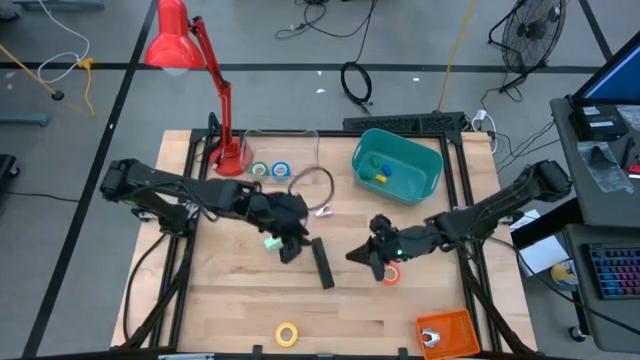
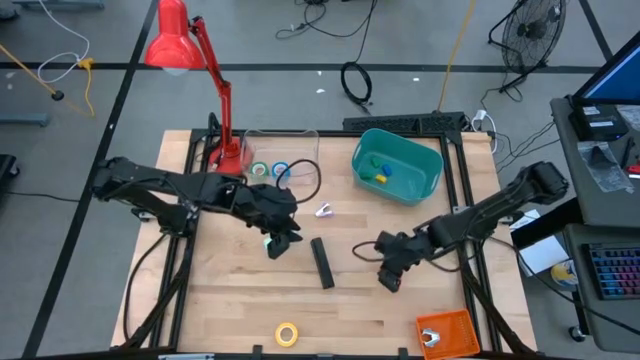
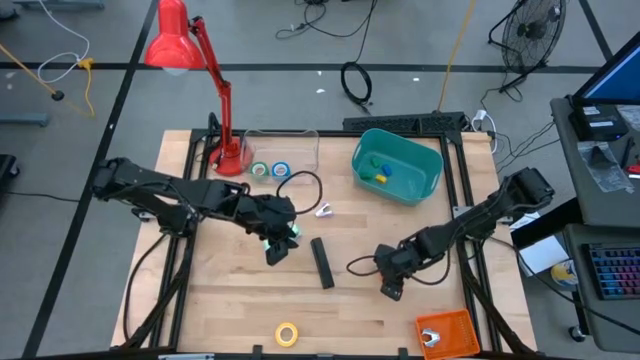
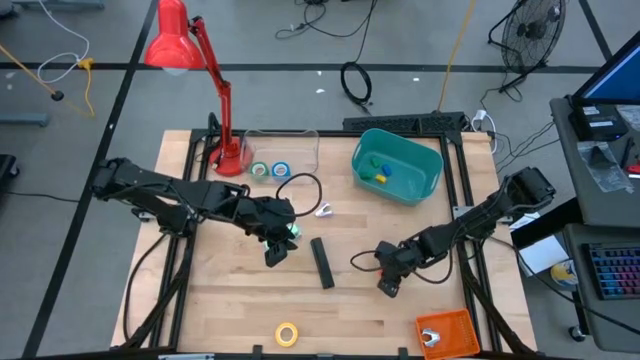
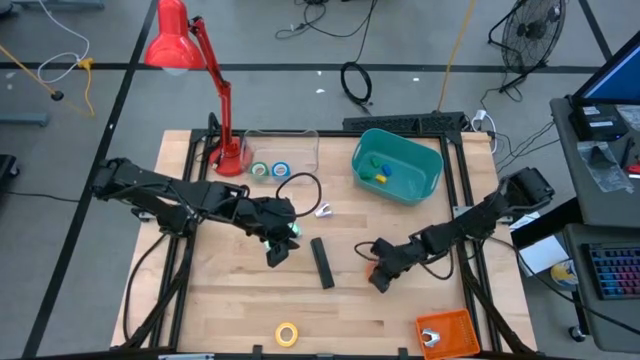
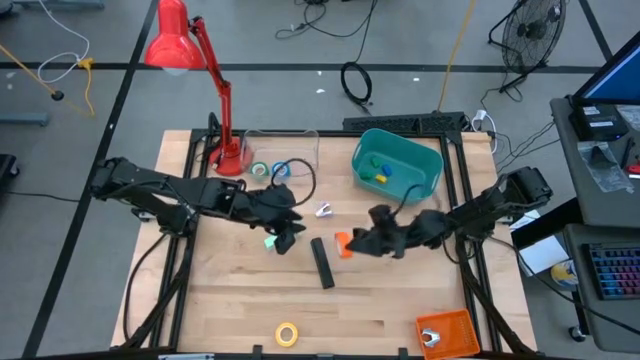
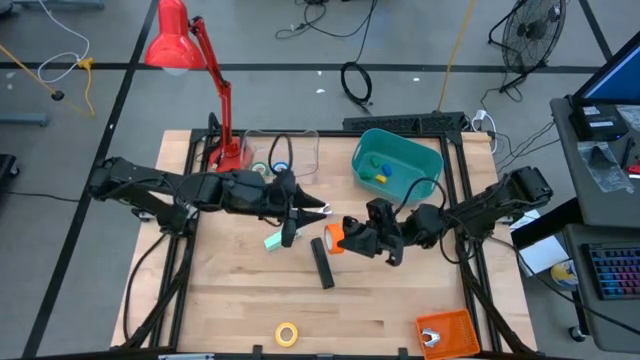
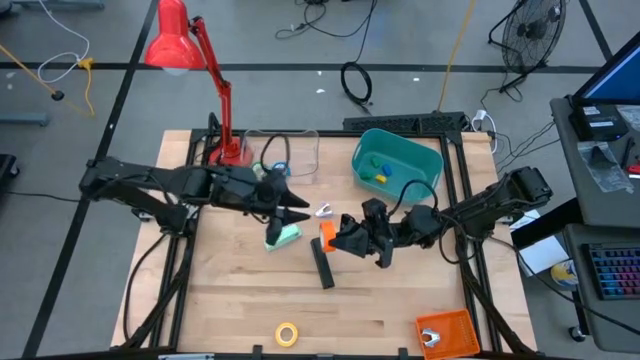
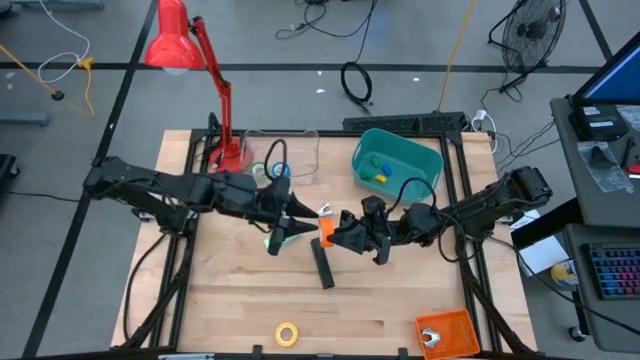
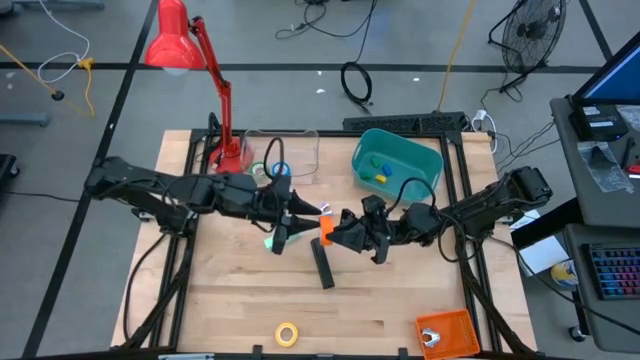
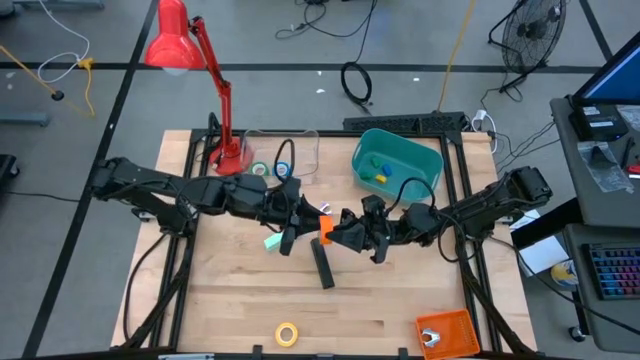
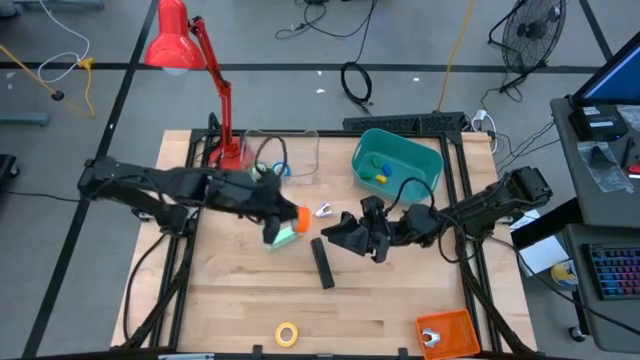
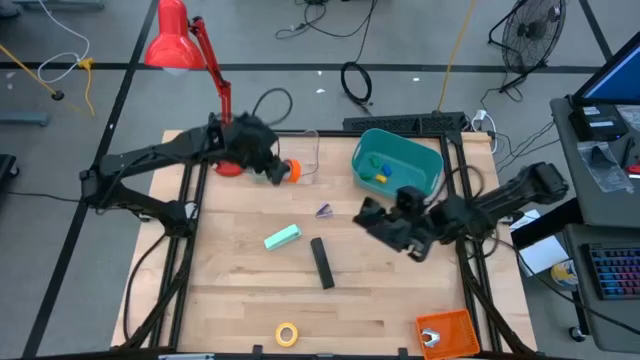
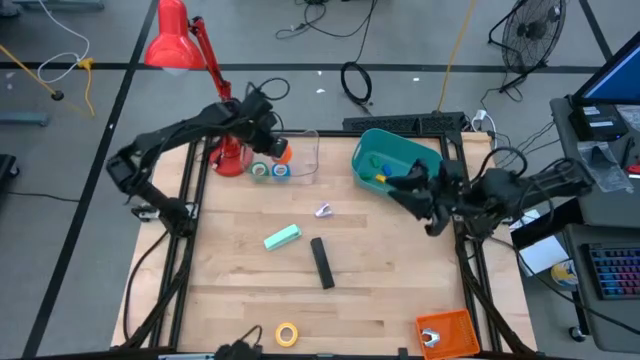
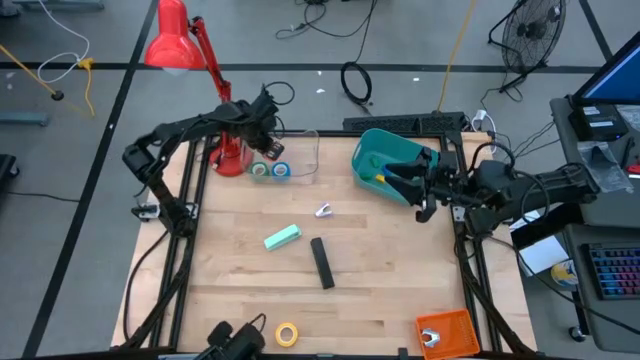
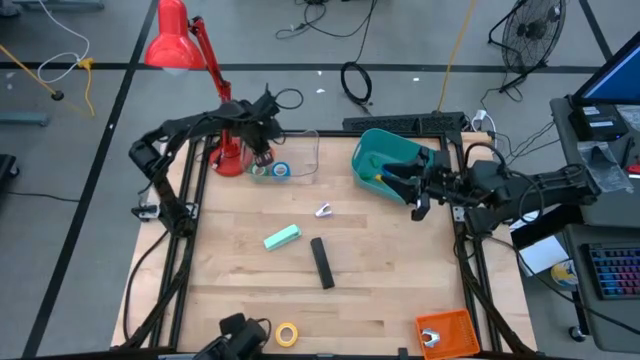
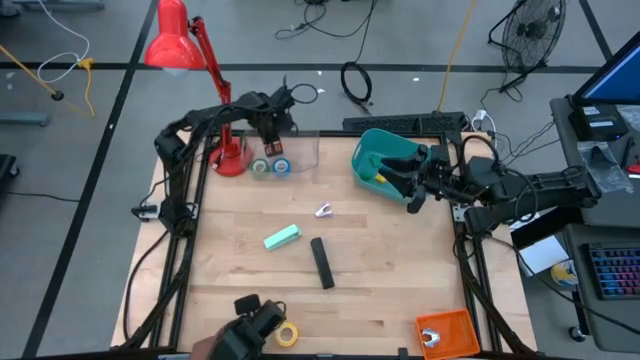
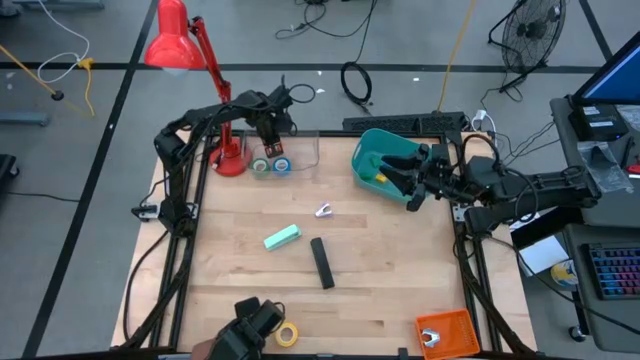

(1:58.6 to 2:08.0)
Task: Pick and place Stapler, Stapler remover, tape
Put the orange tape into the transparent bin

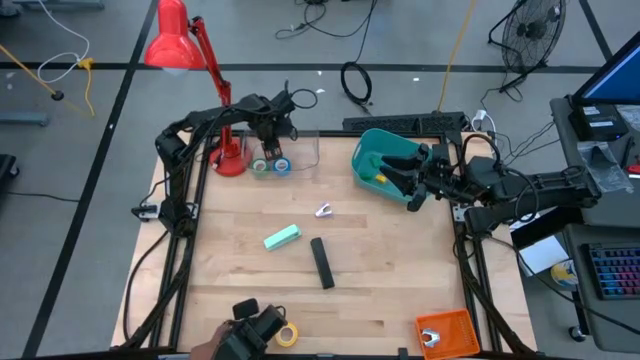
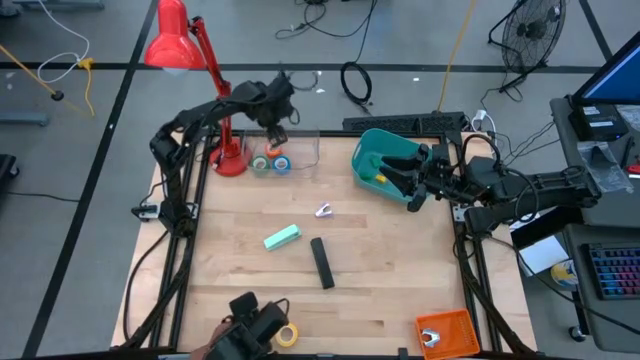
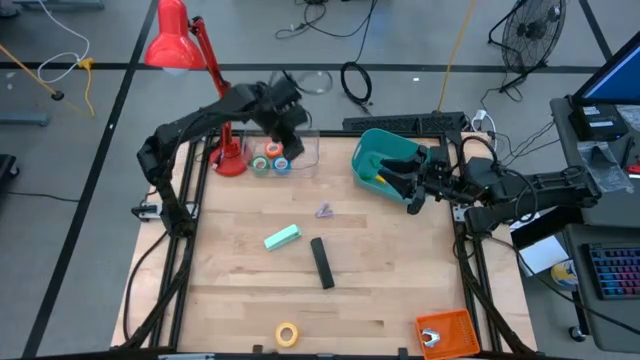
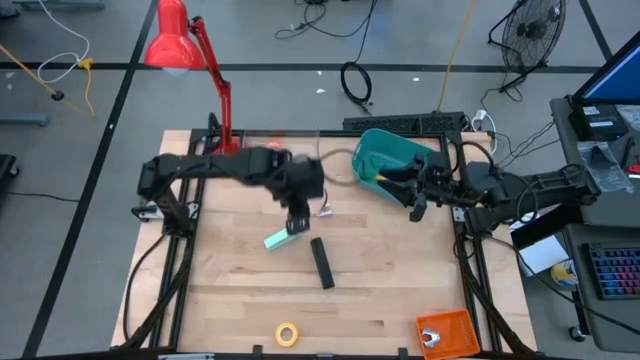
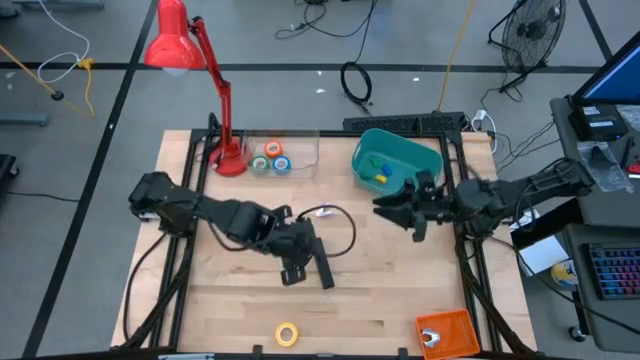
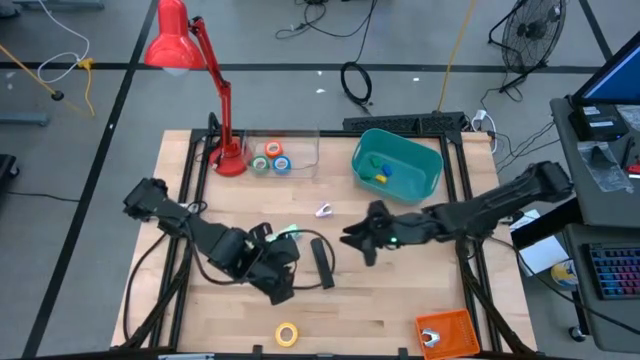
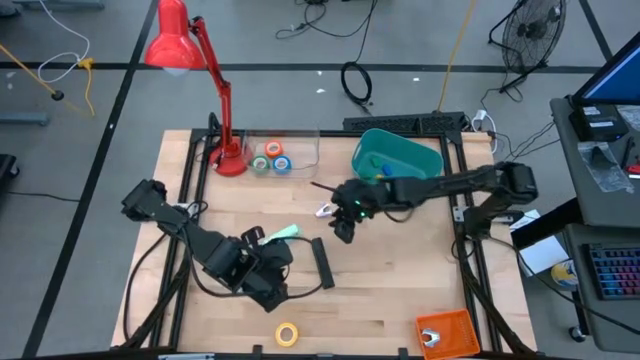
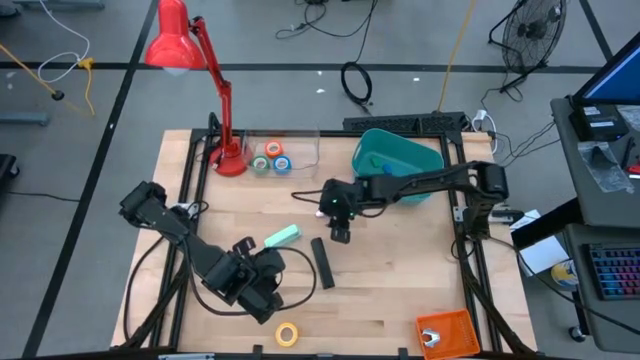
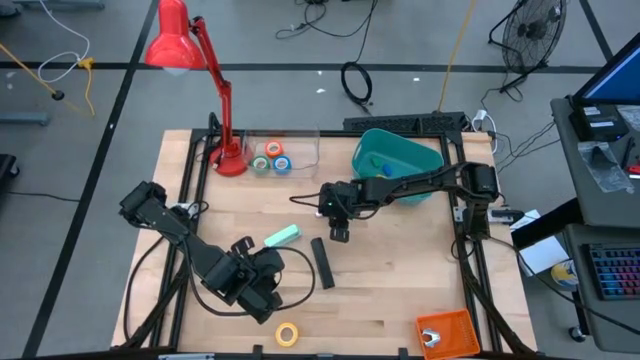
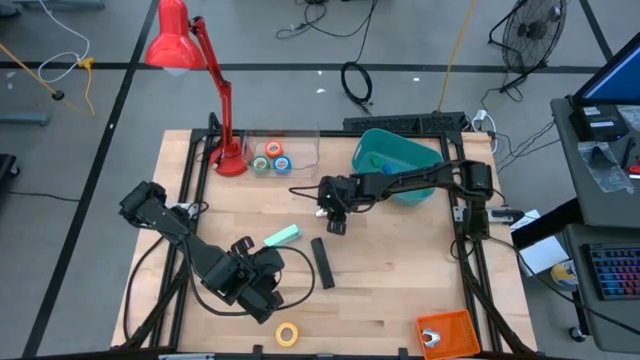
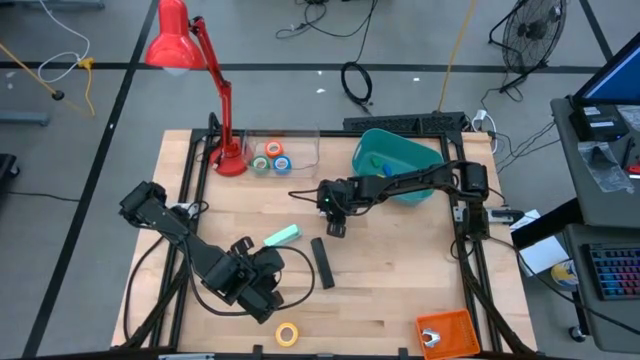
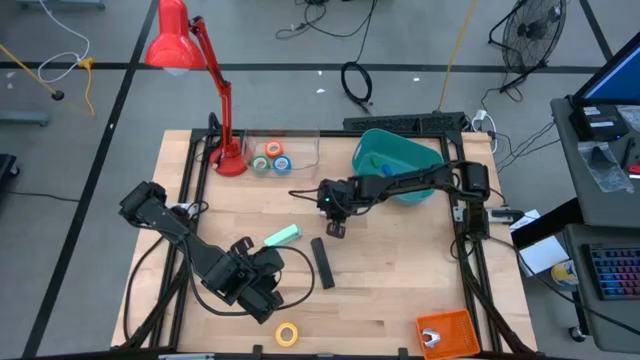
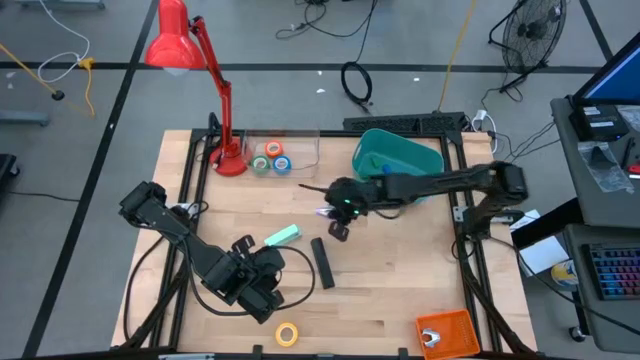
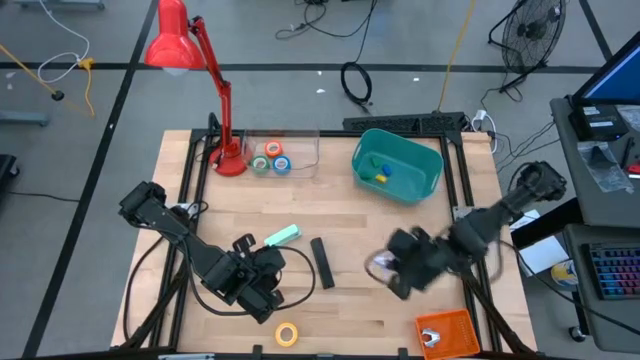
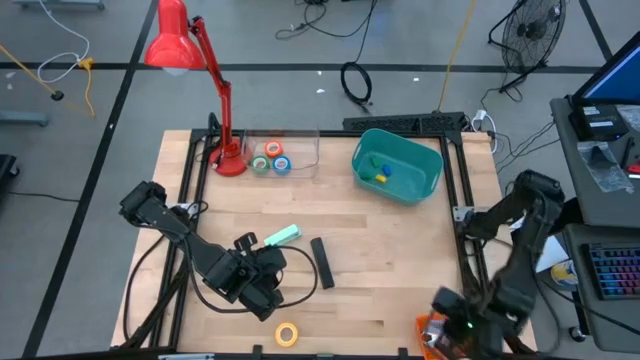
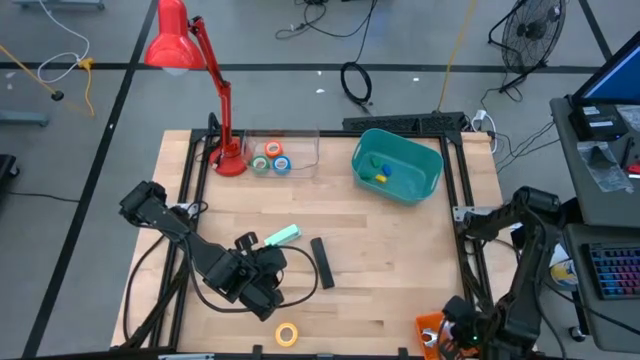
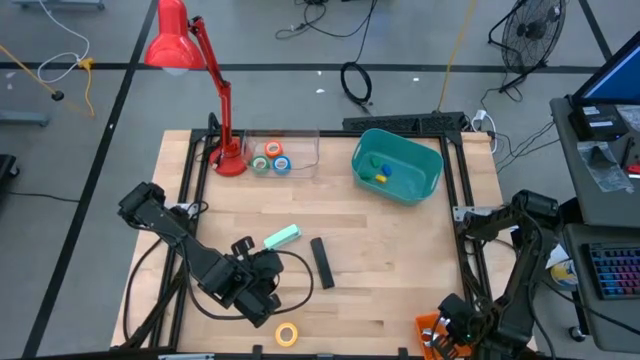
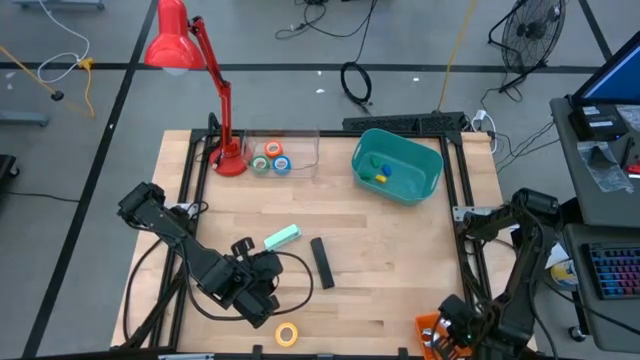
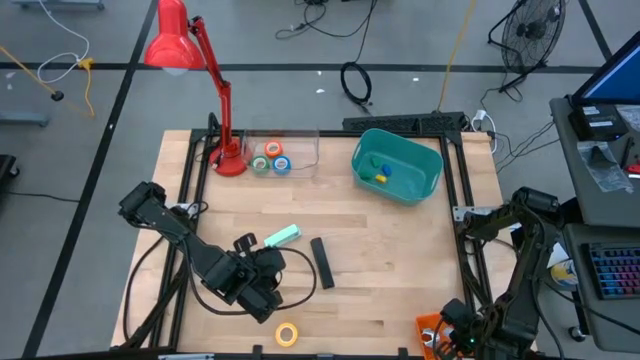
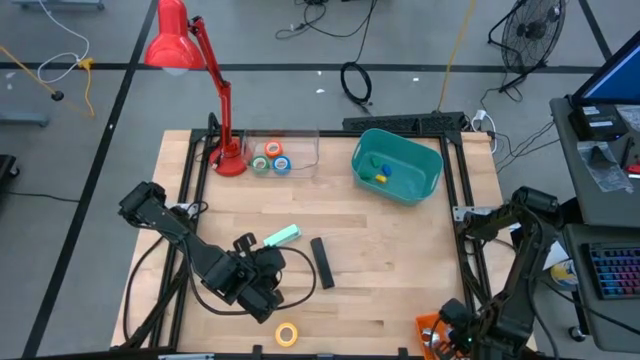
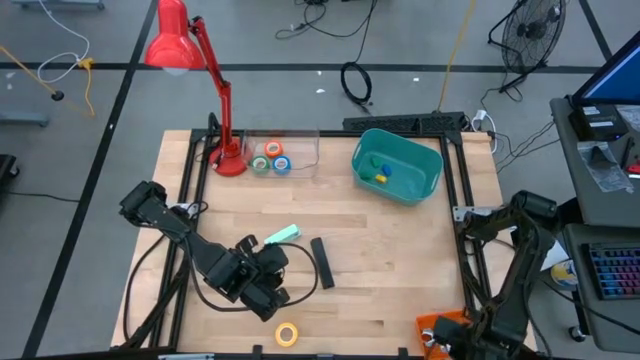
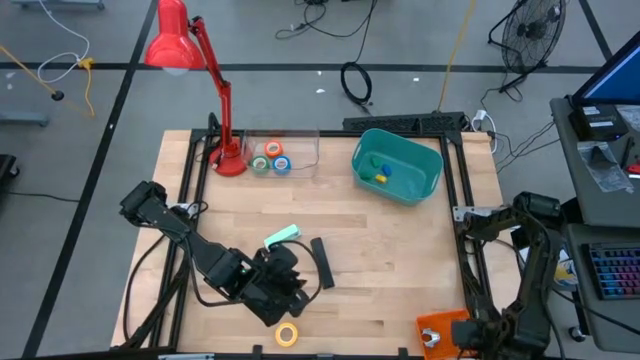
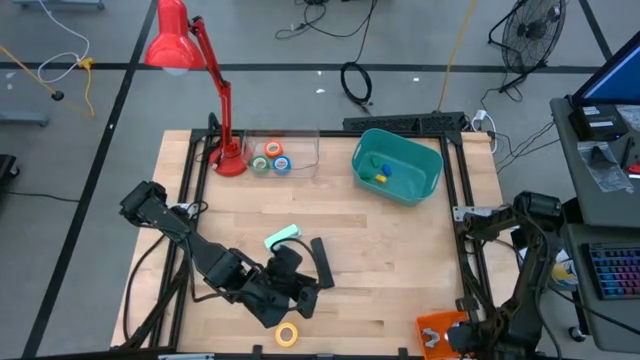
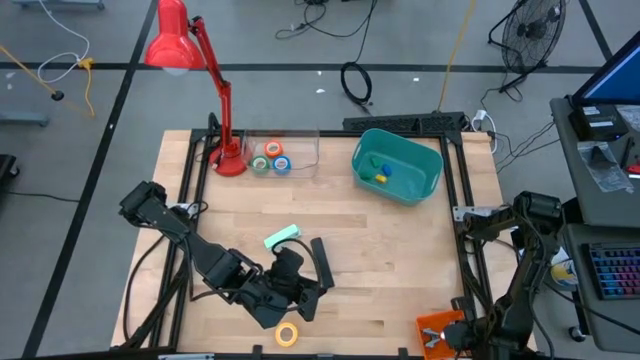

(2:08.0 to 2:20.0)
Put the purple stapler remover into the orange bin

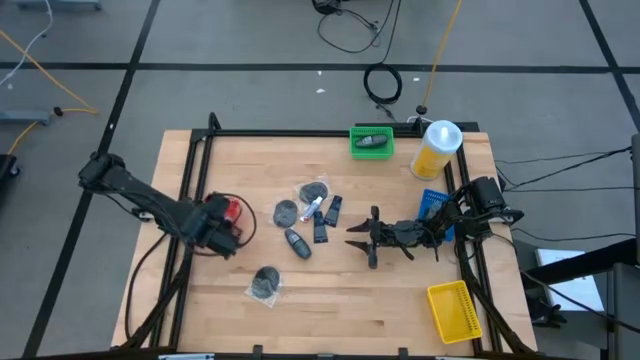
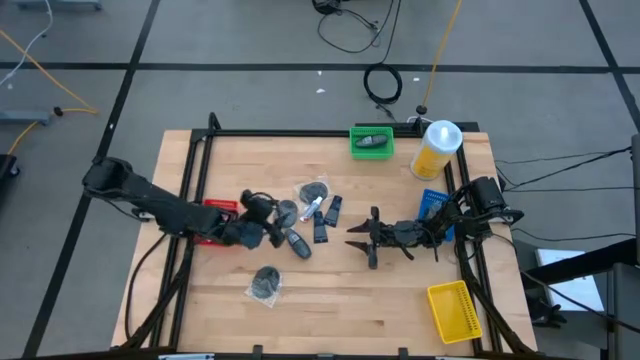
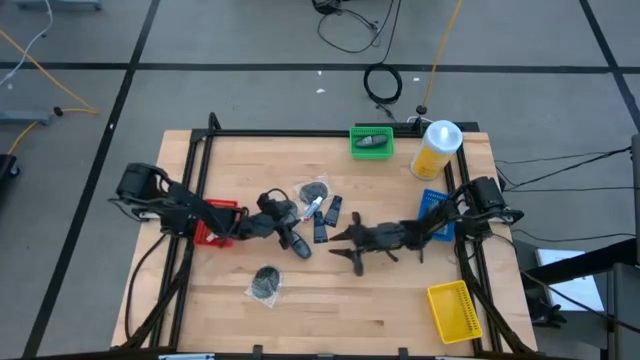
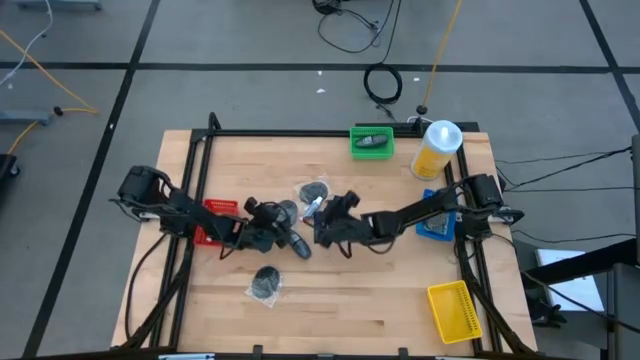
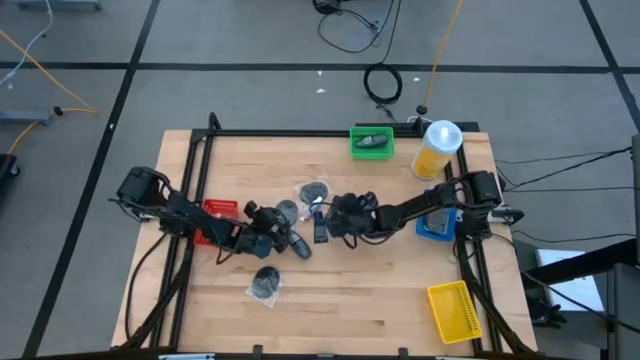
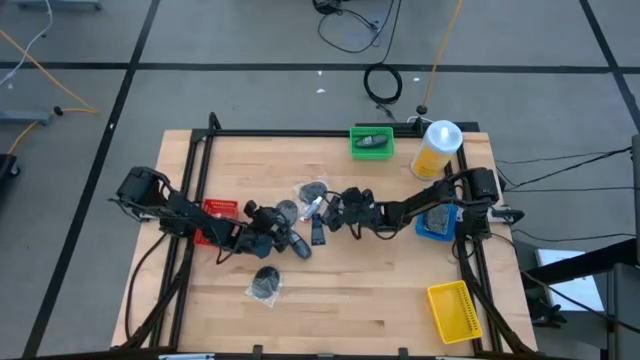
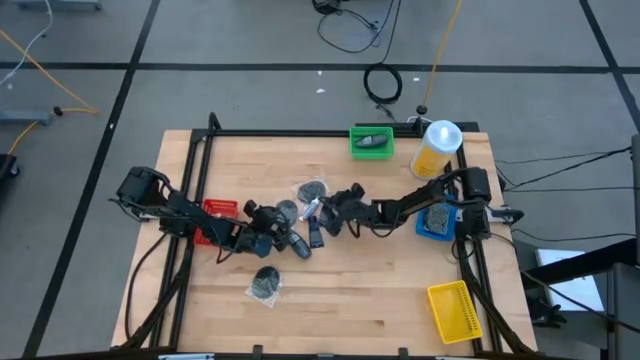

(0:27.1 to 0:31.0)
Task: Pick & Place Travel size toiletries
Put the blue shave cream into the yellow bin
